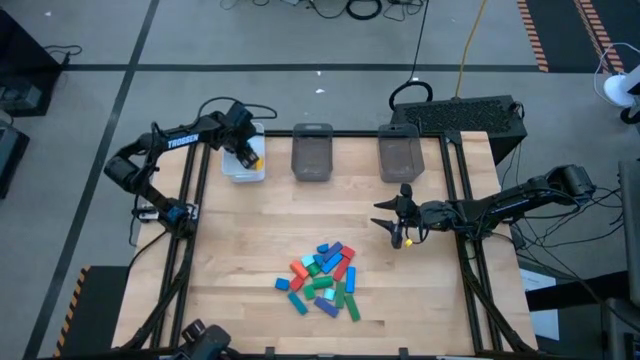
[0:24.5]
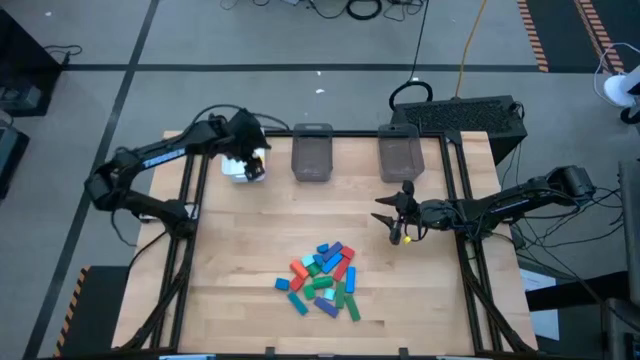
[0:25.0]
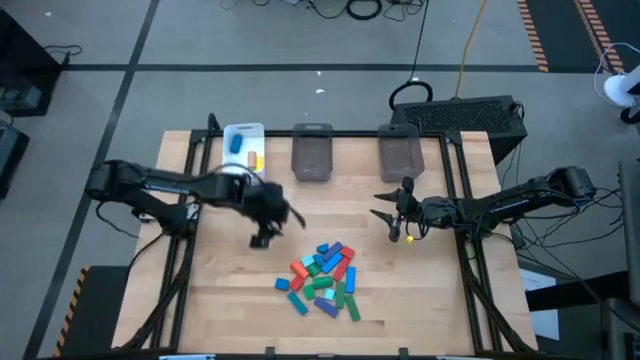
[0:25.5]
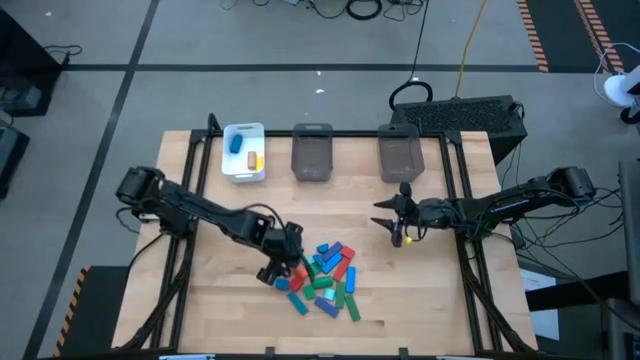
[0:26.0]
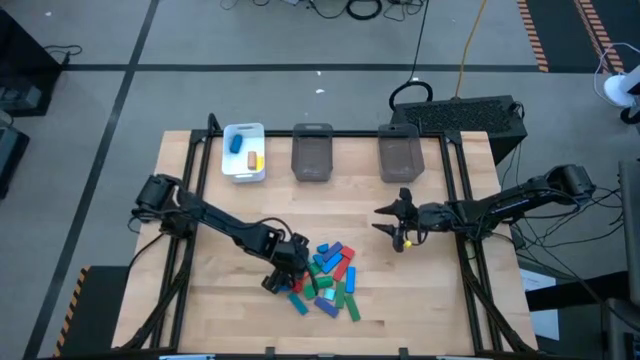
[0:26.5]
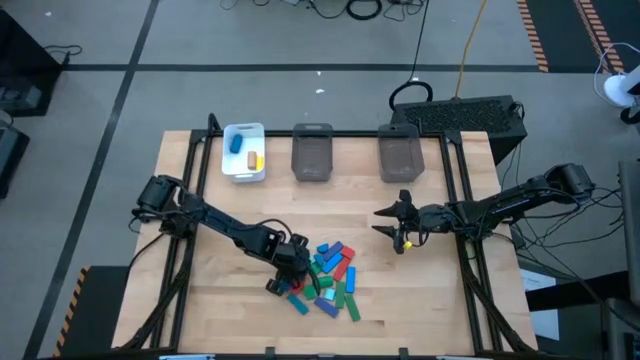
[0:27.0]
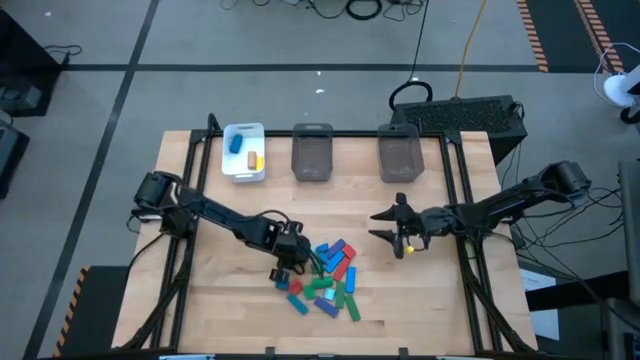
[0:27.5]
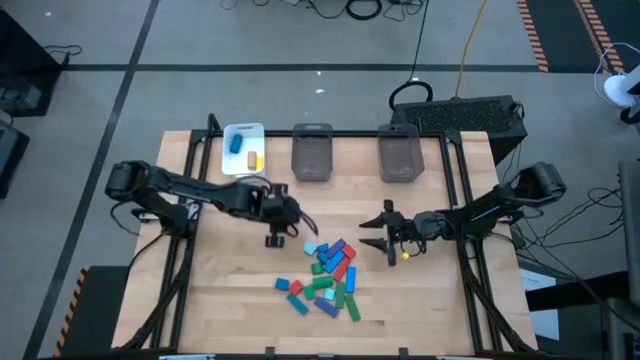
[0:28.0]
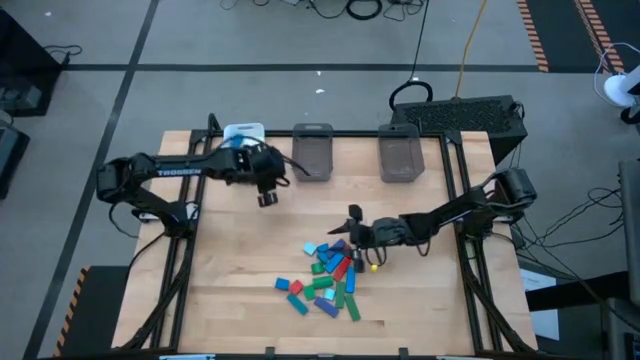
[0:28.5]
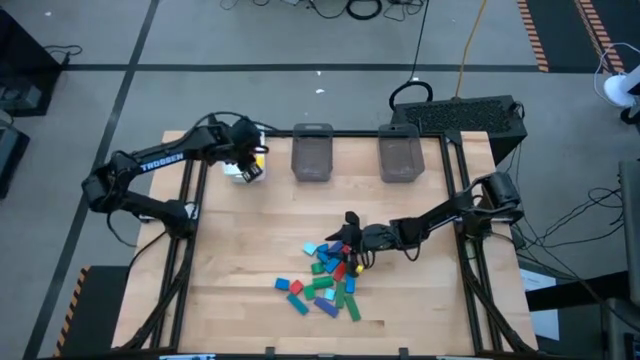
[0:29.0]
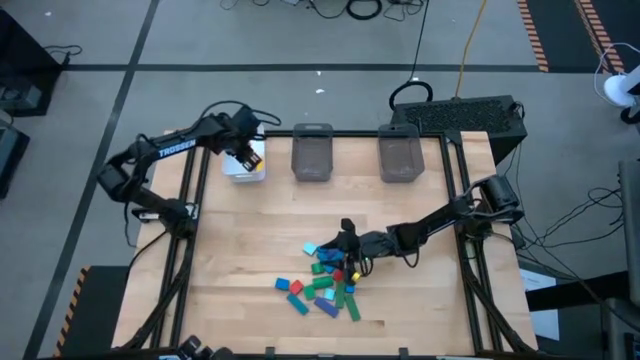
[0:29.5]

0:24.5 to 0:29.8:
Task: Sort blocks by size
Put the orange cylindrical block into the white bin

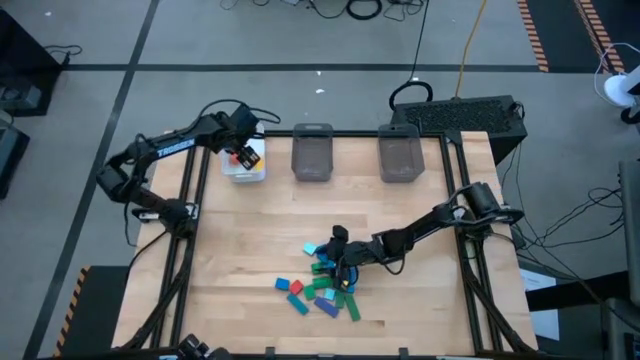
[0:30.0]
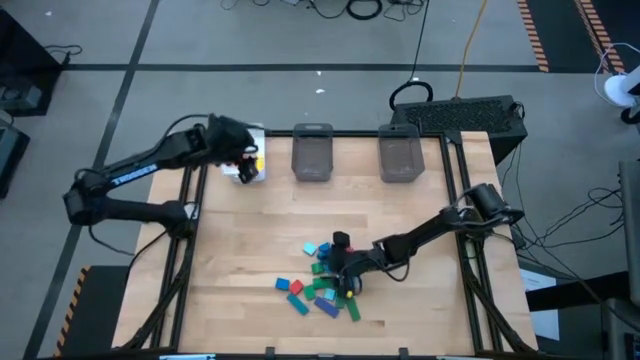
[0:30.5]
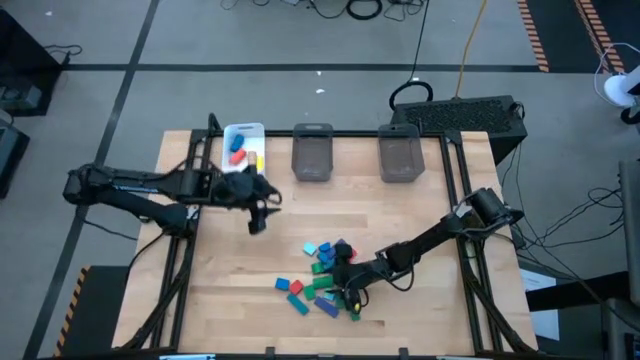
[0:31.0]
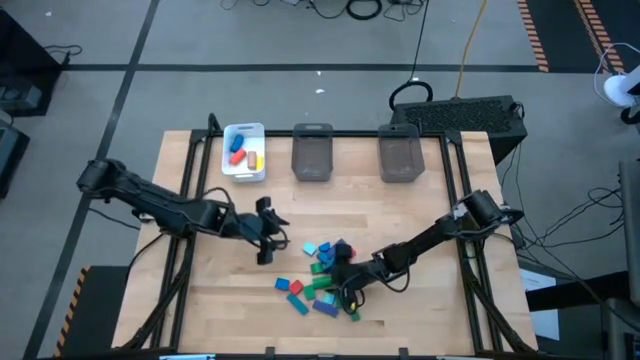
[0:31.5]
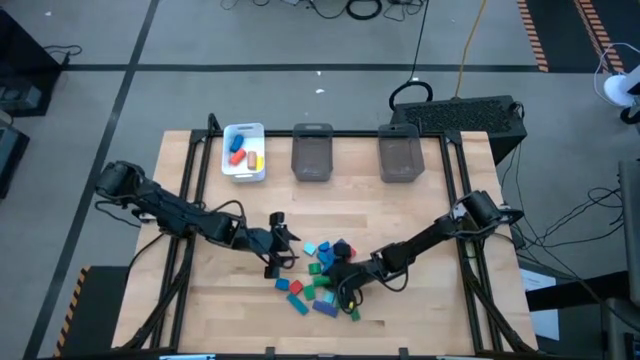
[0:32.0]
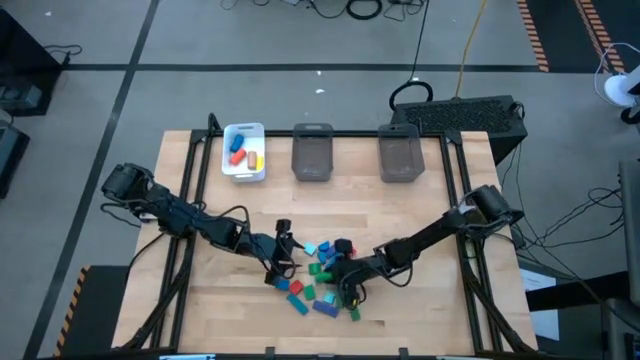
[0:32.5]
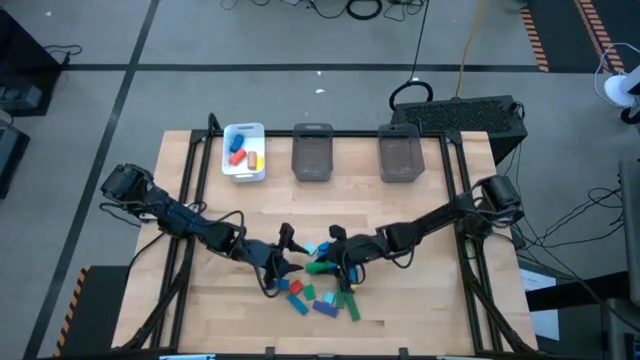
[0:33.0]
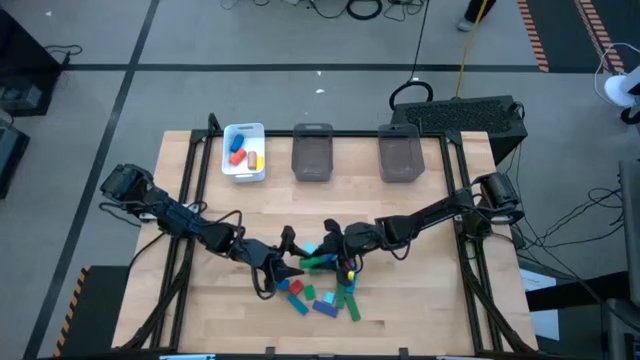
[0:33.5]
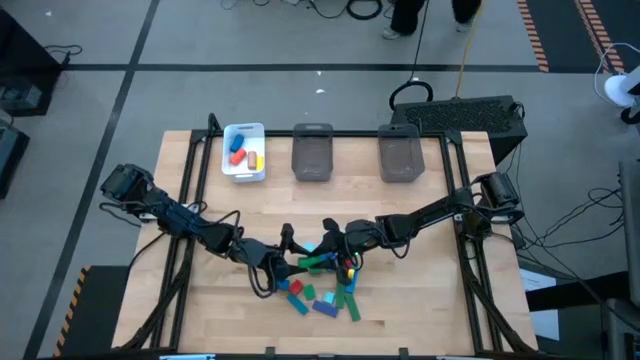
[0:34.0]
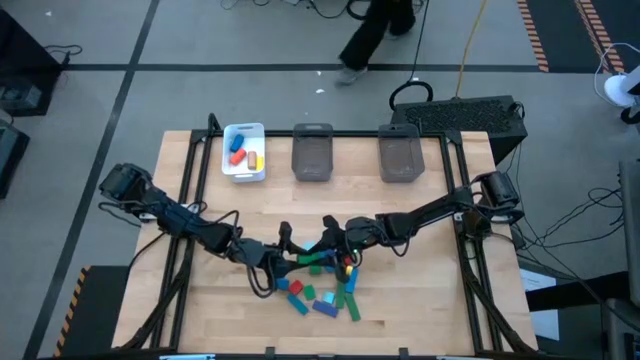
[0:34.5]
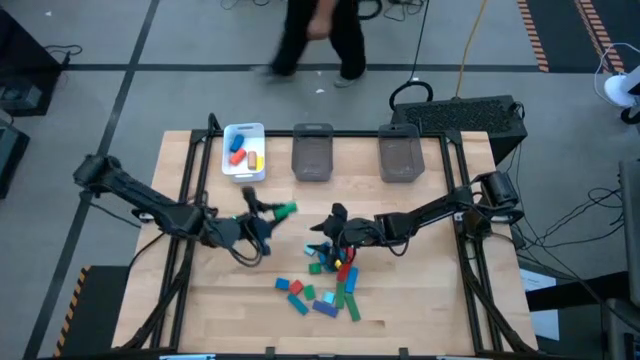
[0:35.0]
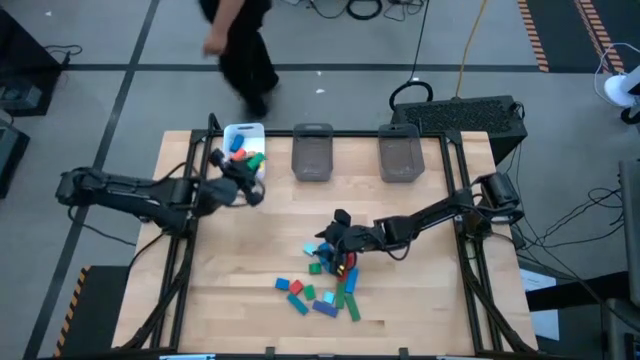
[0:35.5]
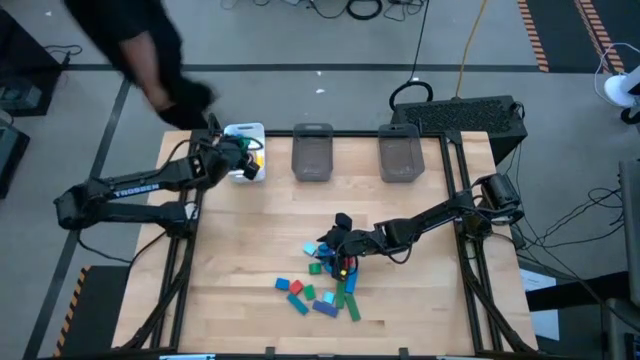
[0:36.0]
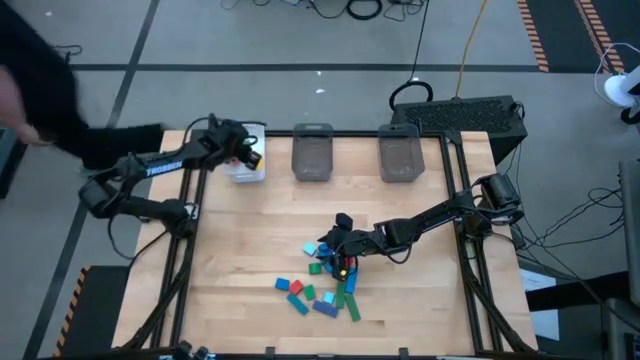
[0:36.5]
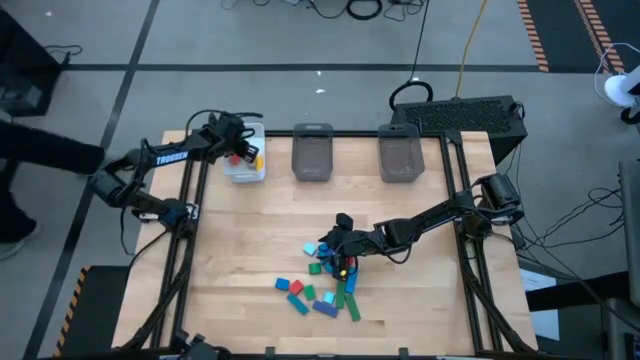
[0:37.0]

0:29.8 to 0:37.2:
Put the green cylindrical block into the white bin

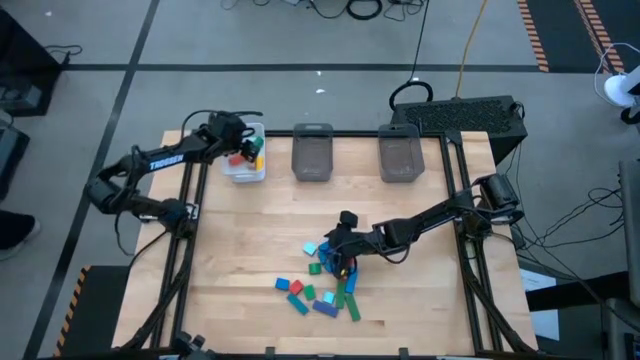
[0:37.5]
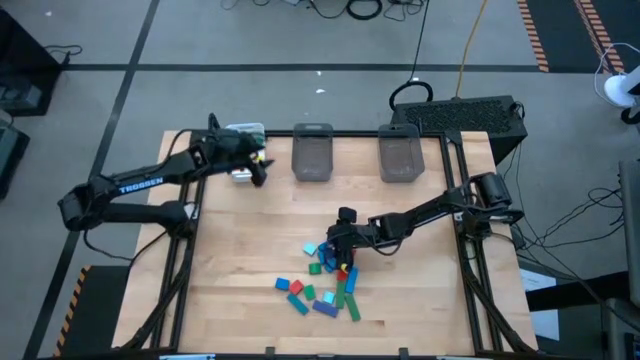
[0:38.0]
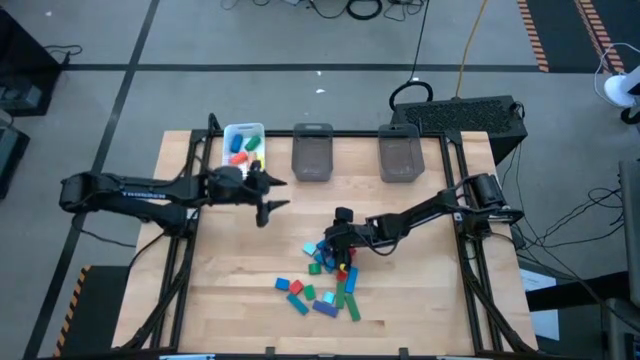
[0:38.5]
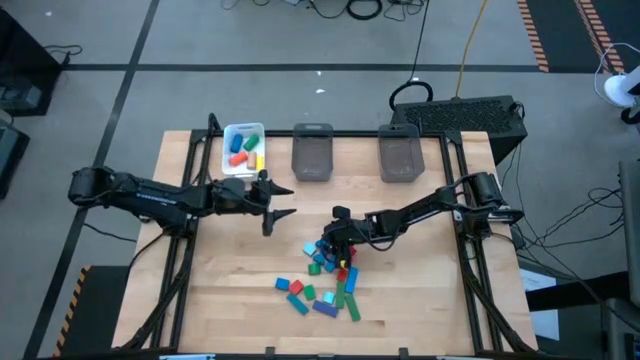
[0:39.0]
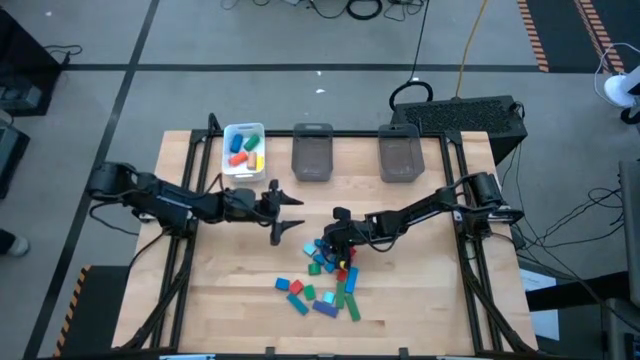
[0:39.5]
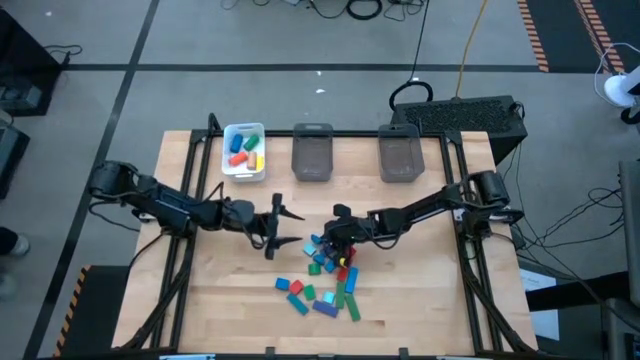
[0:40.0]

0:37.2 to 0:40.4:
Put the blue half circle block into the left black bin

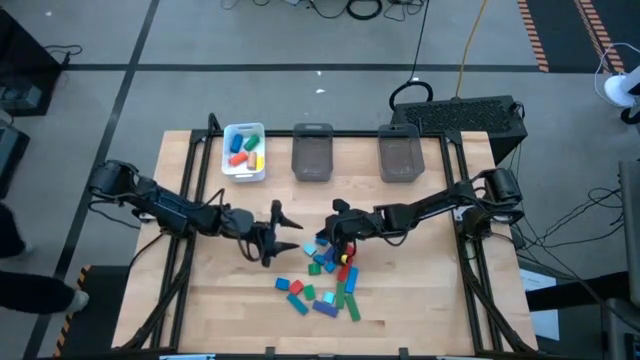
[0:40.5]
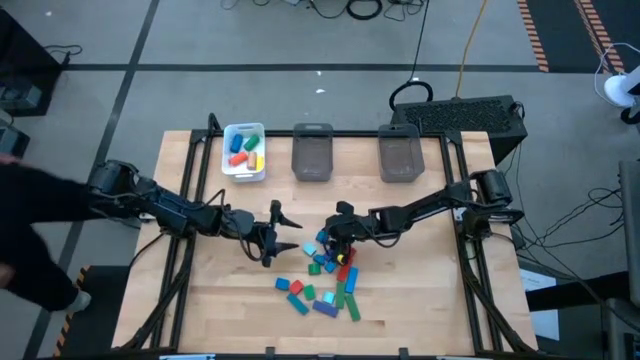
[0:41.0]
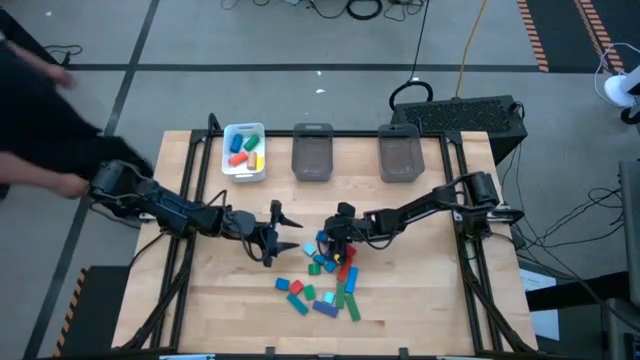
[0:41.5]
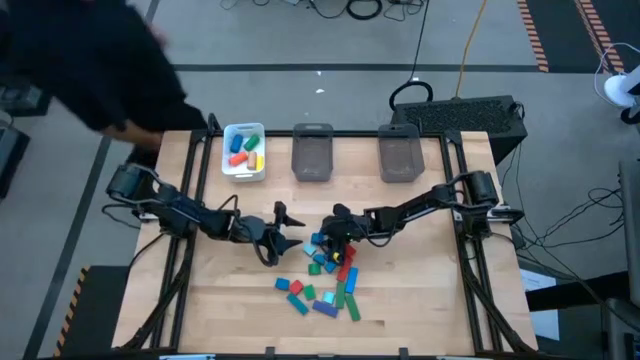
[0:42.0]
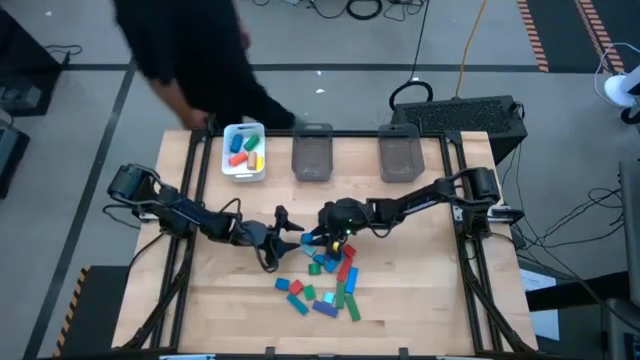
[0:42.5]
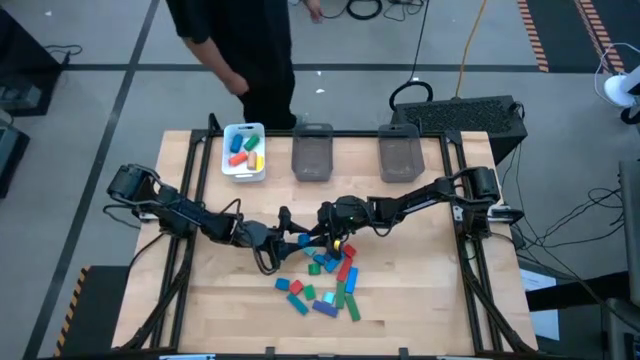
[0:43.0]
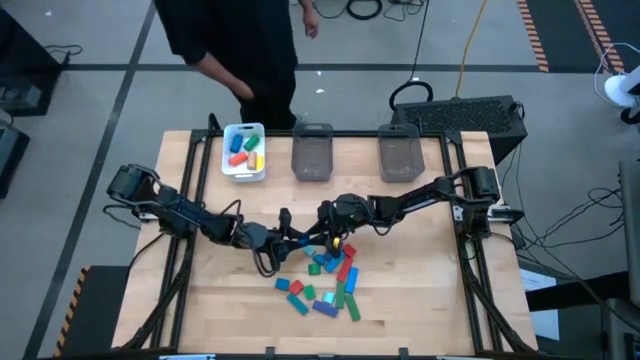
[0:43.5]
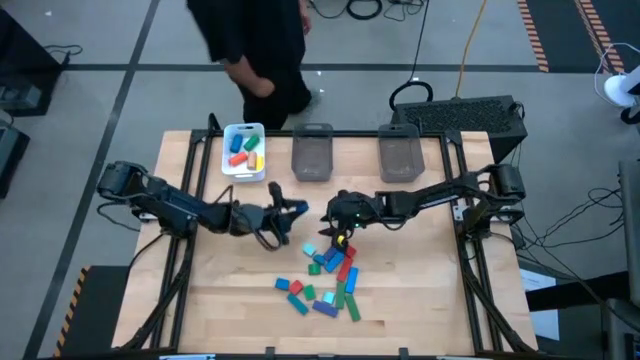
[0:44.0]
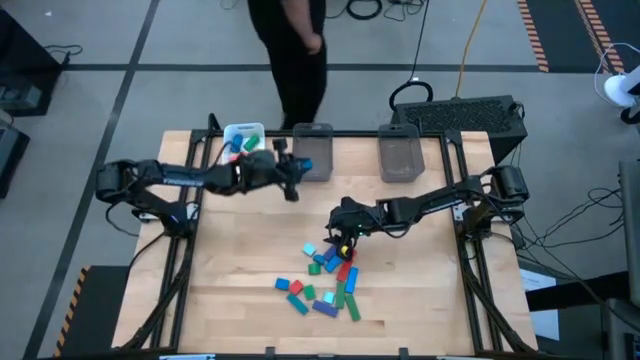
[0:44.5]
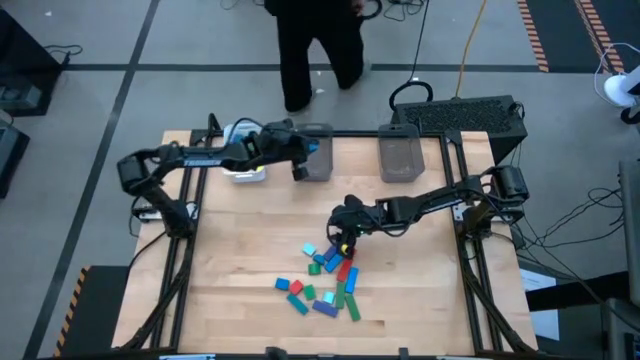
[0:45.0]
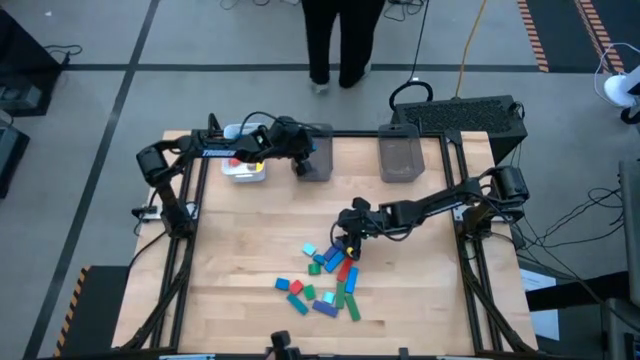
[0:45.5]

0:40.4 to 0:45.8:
Put the blue half circle block into the left black bin
